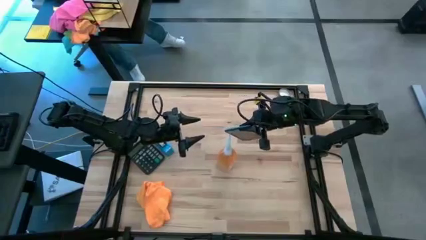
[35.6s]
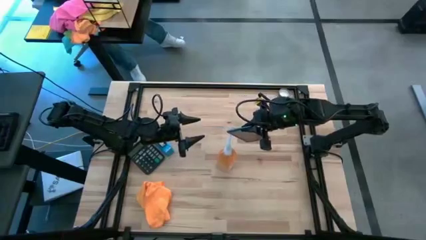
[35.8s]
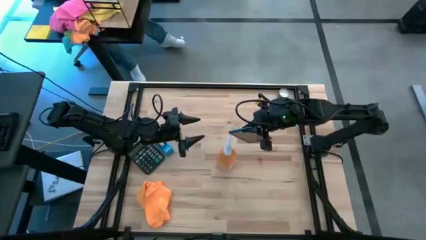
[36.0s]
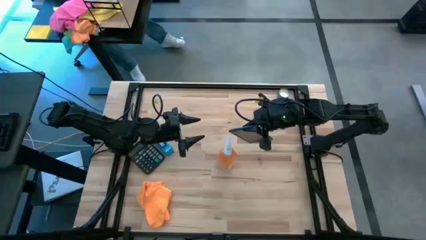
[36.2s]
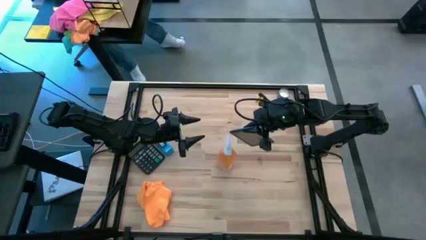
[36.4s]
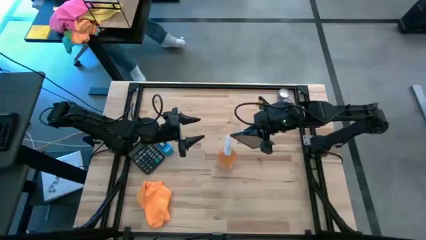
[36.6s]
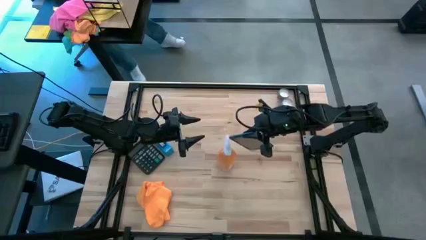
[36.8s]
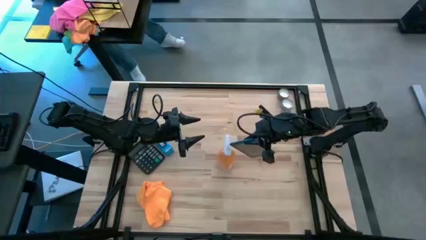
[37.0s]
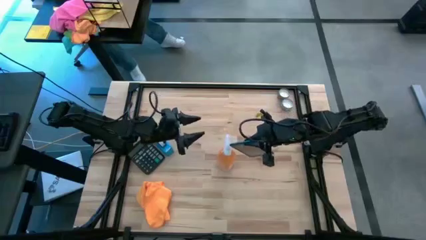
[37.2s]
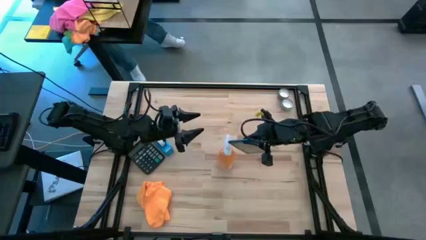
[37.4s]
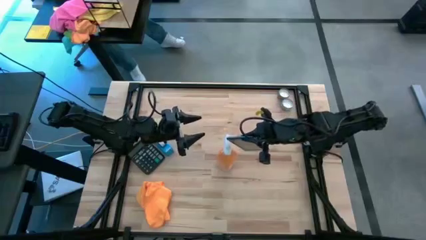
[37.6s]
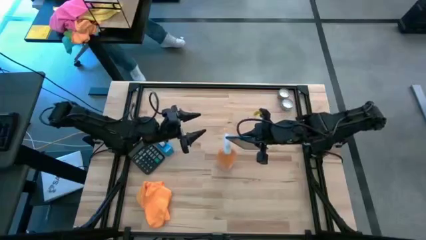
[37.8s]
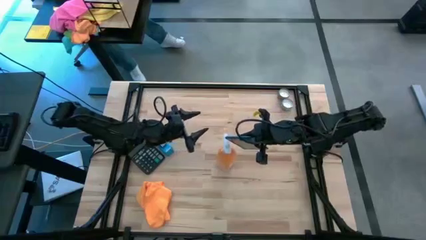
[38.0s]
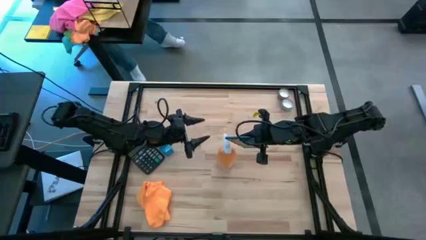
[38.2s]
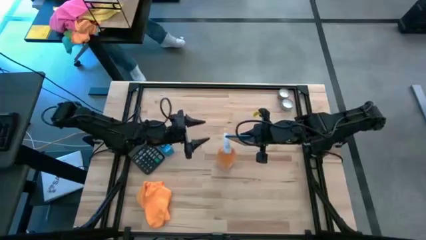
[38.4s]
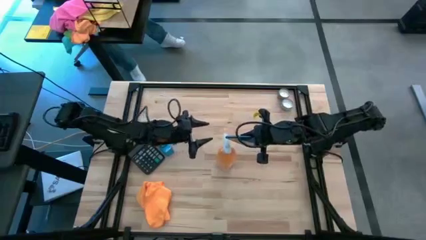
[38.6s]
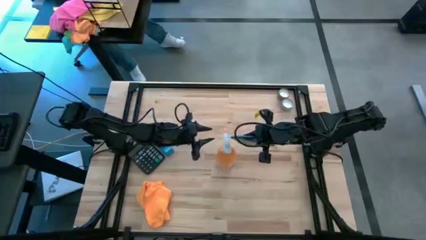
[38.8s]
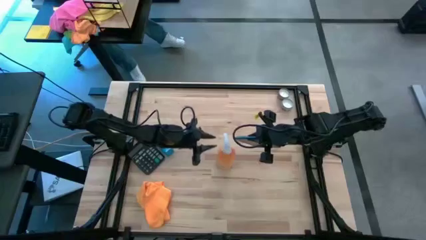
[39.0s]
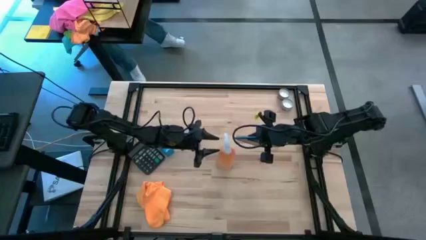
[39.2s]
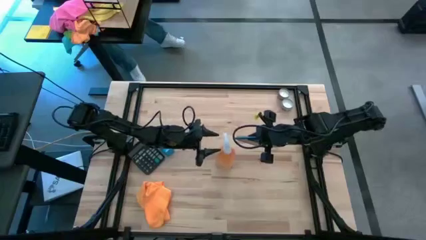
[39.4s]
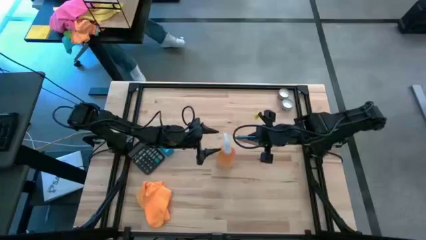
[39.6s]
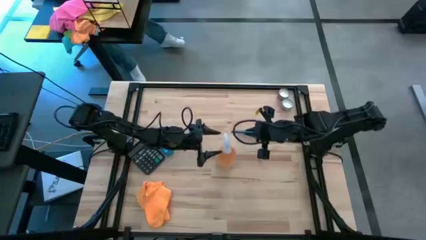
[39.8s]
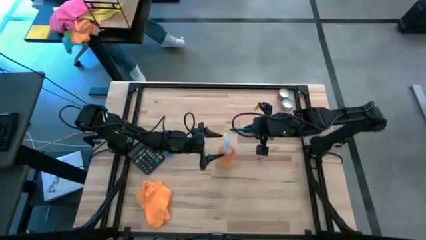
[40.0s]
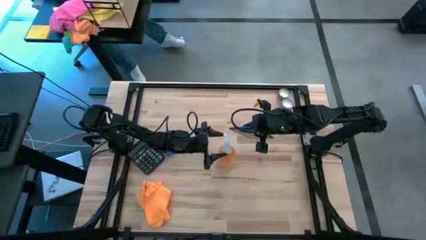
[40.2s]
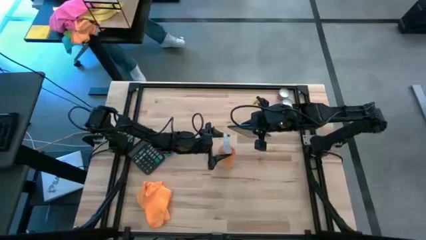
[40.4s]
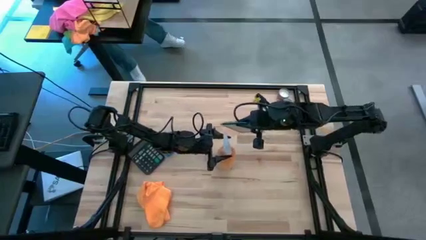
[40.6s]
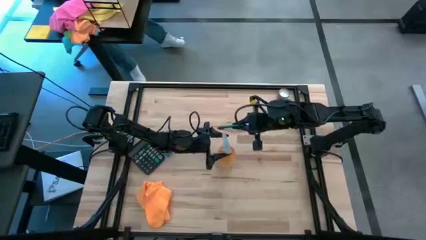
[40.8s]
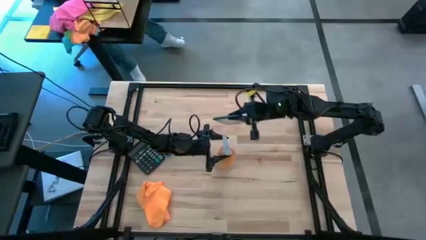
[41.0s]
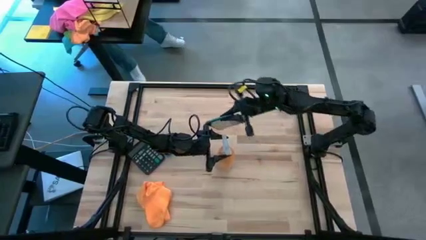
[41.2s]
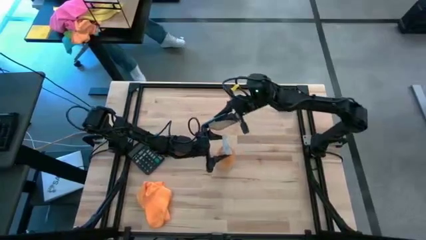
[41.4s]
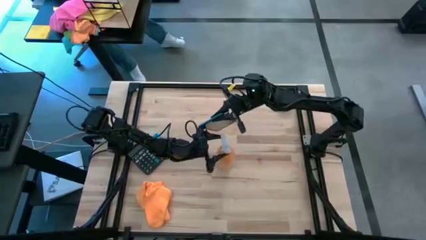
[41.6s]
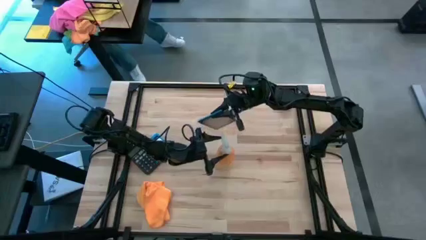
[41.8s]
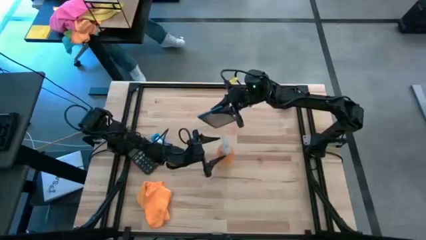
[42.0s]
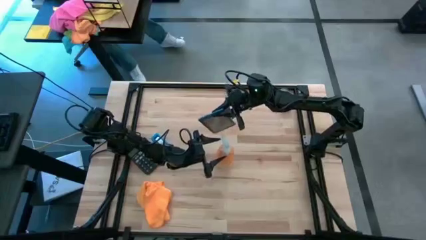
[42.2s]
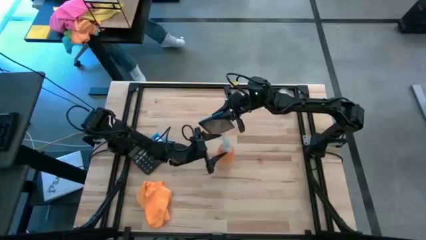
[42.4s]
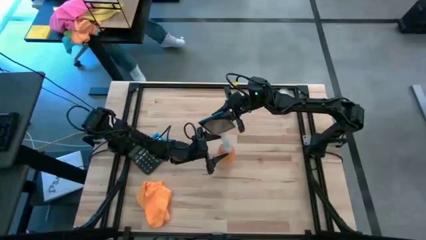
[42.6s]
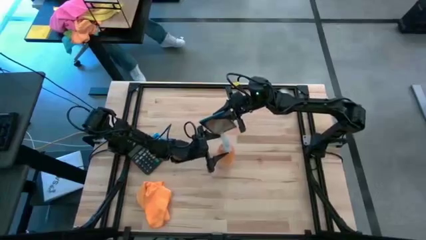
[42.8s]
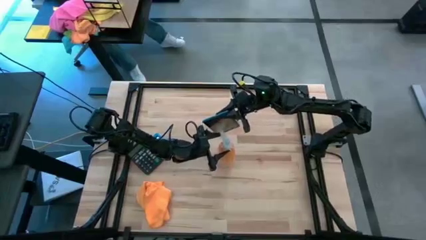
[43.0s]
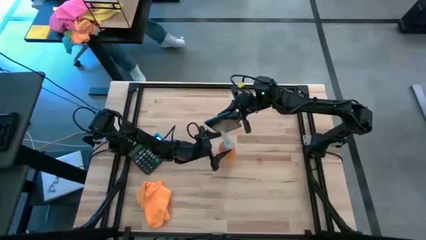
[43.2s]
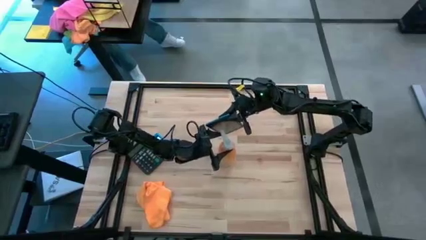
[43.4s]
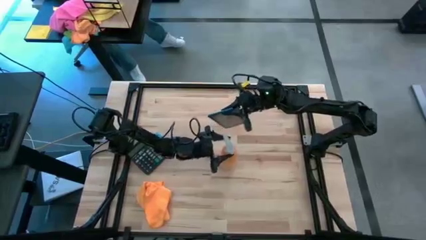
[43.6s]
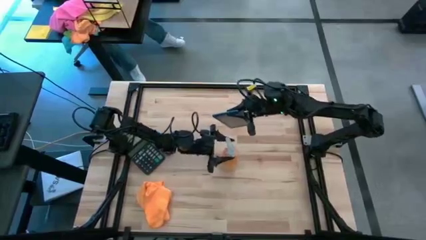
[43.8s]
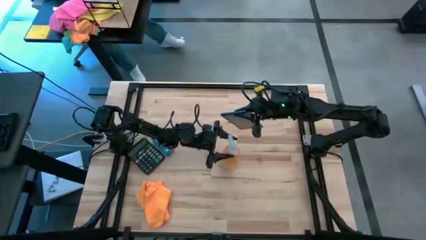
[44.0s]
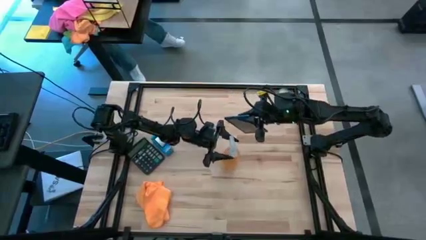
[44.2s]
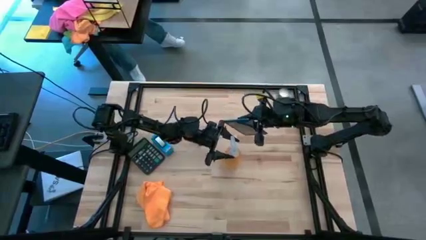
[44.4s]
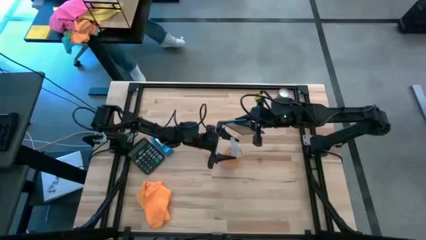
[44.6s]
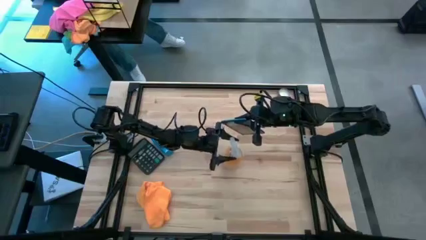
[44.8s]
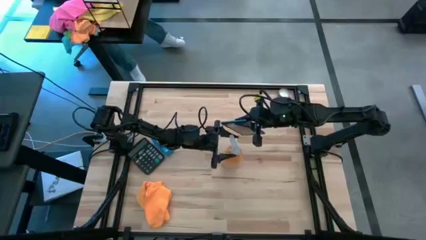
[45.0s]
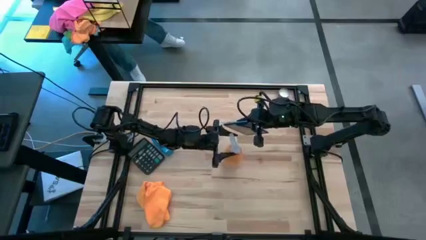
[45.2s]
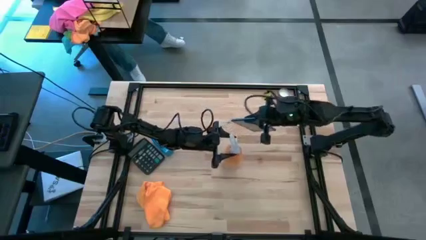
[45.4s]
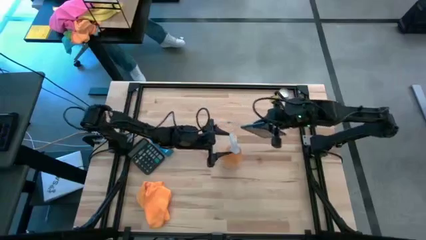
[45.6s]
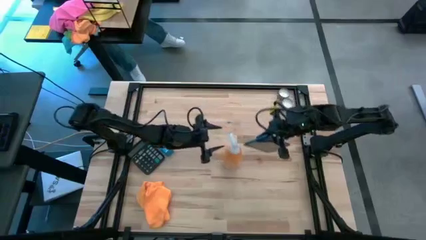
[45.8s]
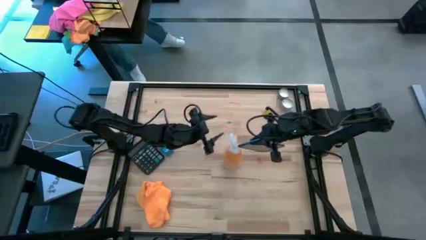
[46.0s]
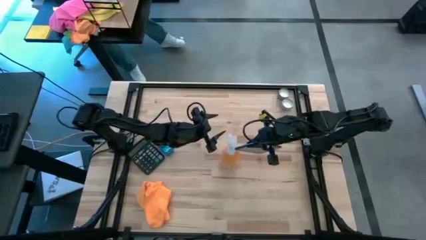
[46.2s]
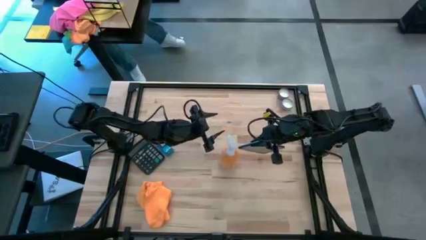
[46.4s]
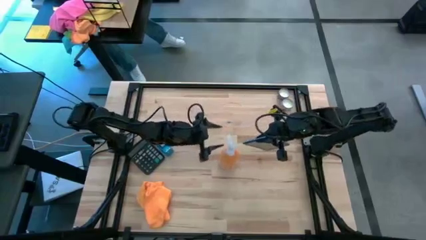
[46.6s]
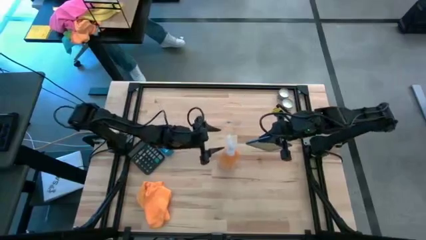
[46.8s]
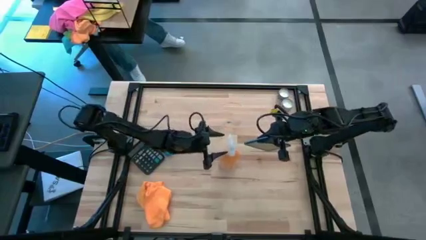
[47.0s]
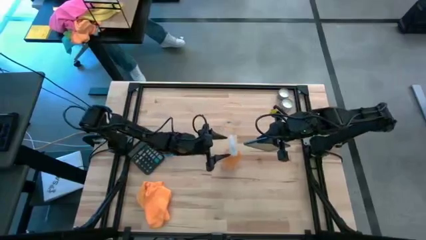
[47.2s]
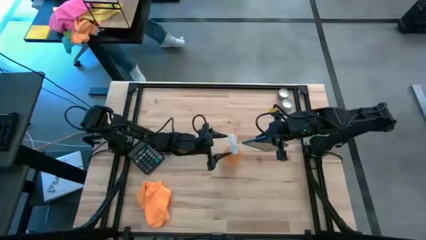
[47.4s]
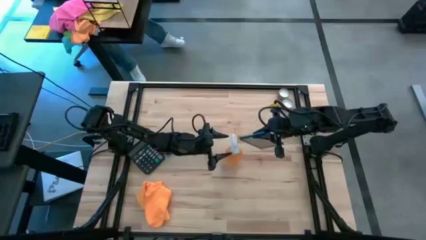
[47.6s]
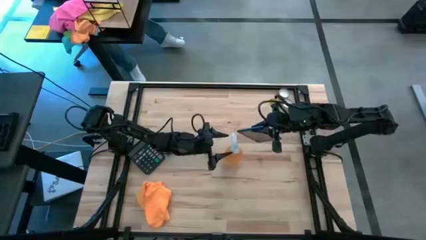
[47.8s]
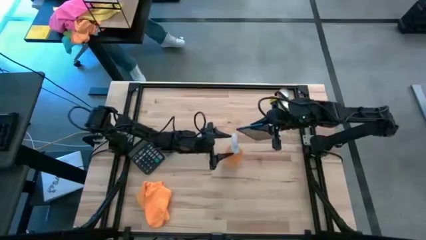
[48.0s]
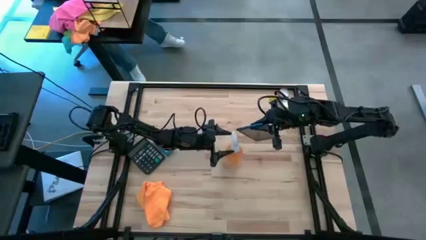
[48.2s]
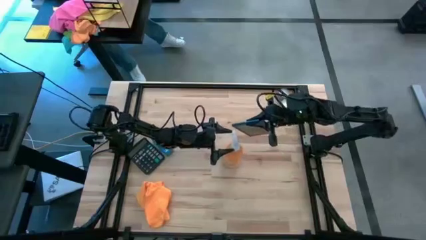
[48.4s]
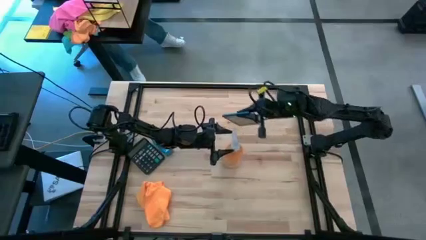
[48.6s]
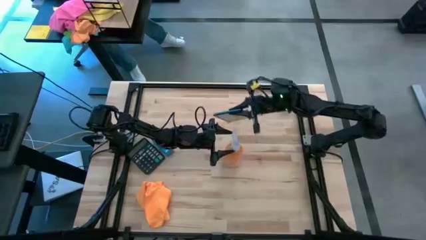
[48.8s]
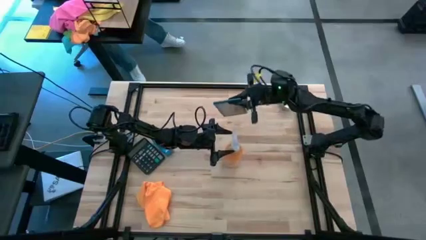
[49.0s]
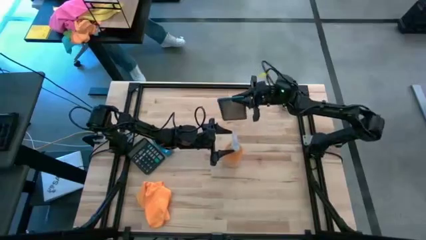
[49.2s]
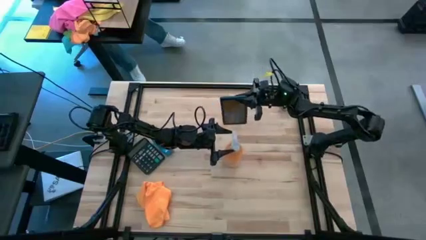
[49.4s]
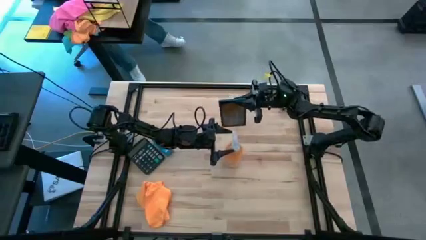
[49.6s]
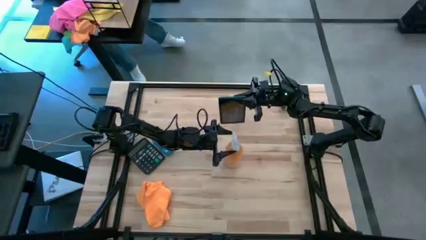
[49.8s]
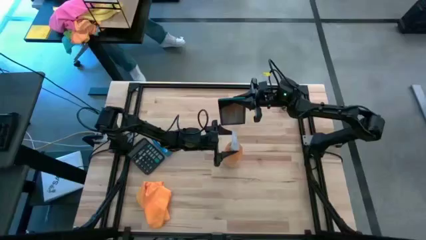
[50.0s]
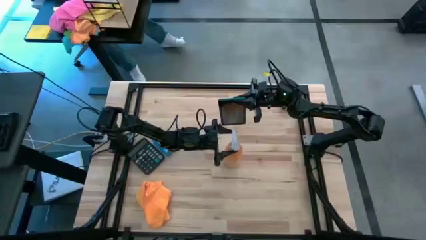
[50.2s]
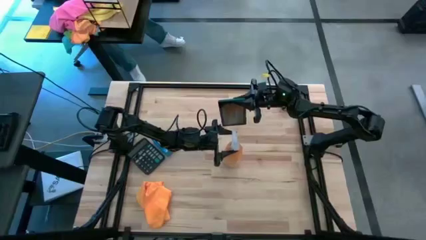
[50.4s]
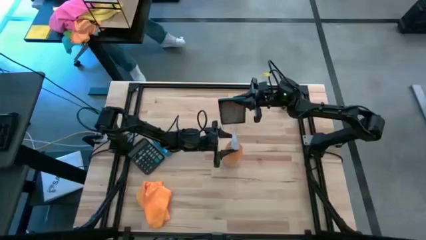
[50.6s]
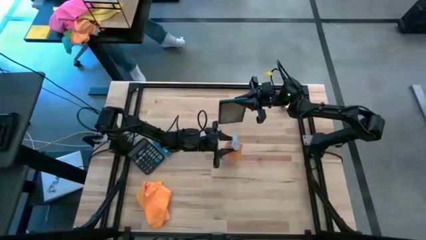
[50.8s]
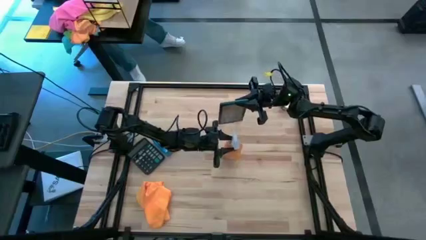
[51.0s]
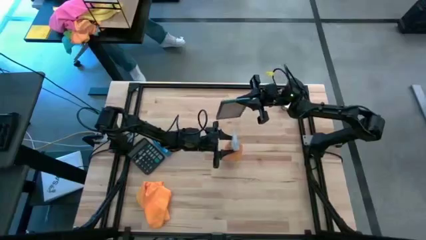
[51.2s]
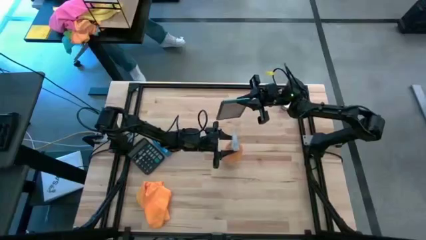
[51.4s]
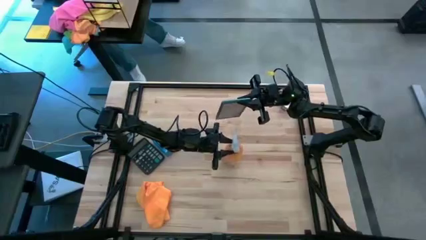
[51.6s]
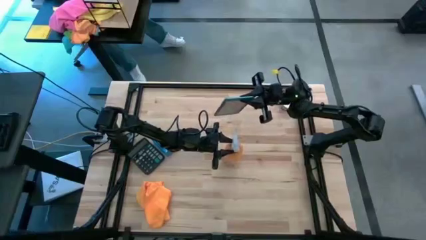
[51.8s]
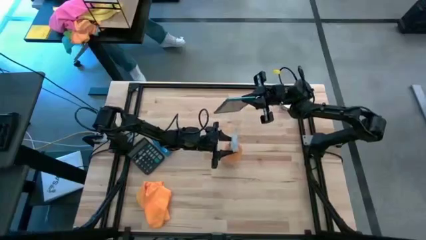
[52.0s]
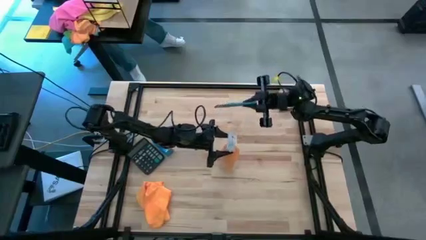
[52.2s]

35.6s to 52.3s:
Task: Apply microfiber cloth
Spray the blue phone using the orange spray bottle
